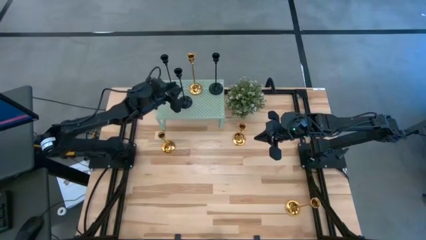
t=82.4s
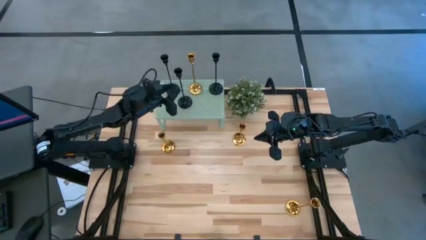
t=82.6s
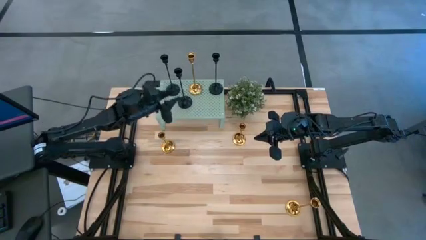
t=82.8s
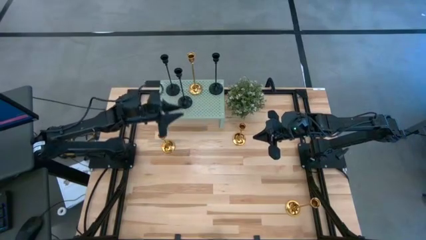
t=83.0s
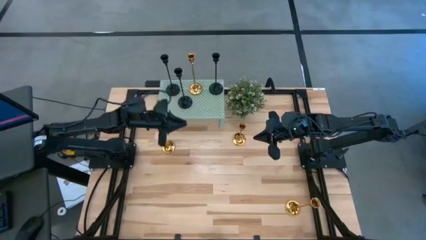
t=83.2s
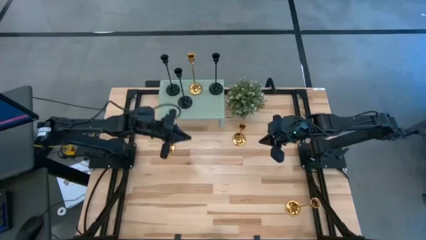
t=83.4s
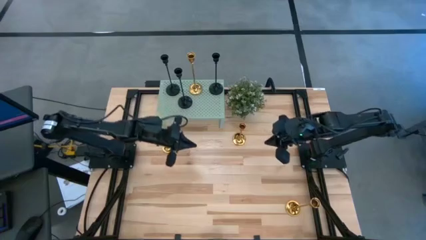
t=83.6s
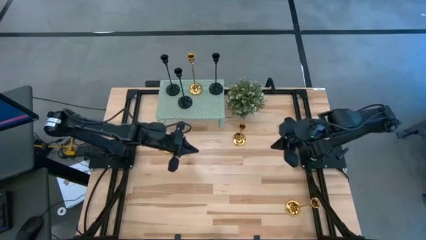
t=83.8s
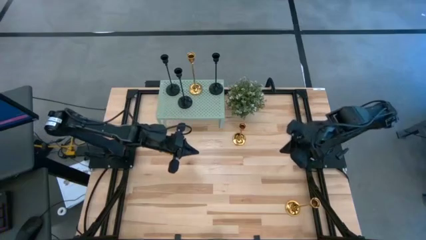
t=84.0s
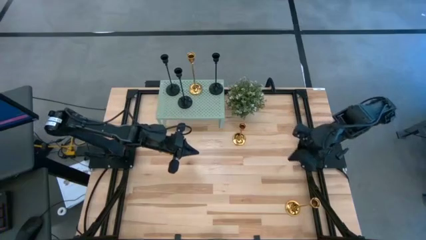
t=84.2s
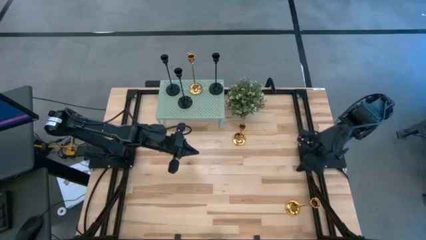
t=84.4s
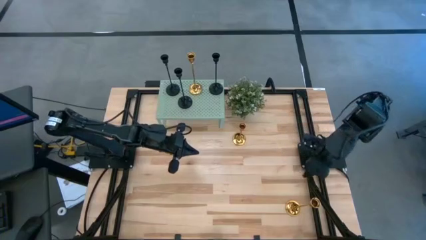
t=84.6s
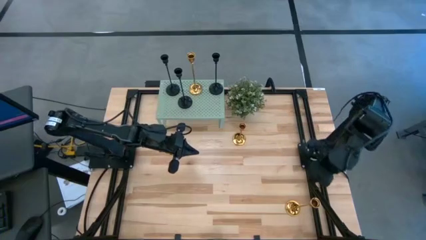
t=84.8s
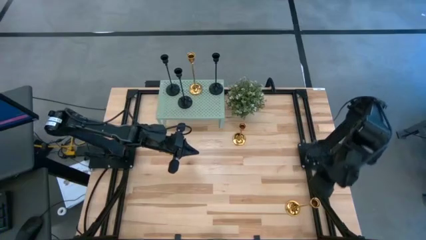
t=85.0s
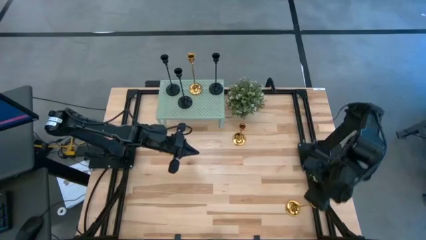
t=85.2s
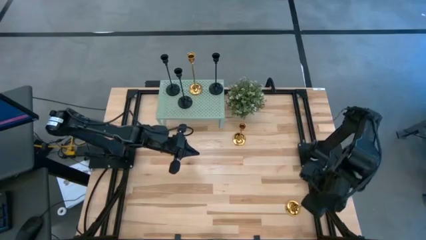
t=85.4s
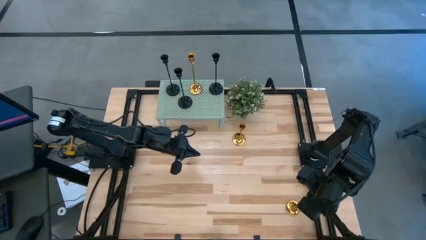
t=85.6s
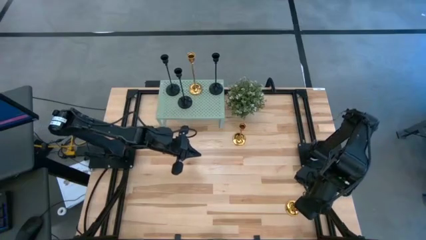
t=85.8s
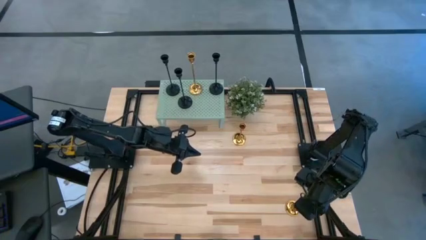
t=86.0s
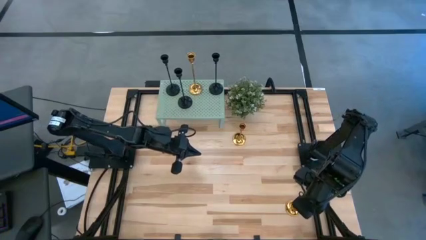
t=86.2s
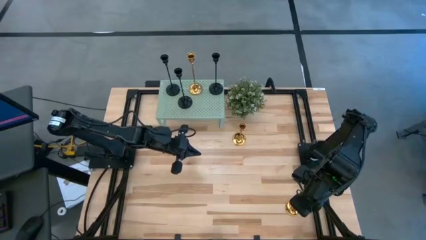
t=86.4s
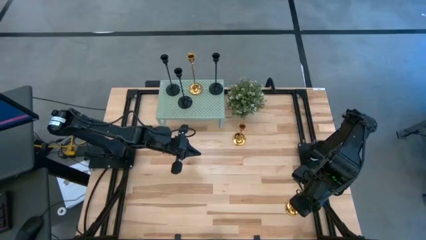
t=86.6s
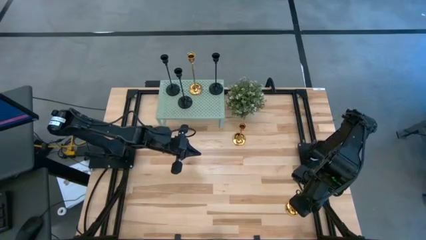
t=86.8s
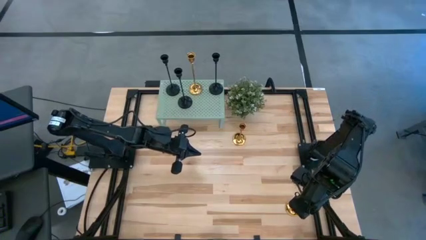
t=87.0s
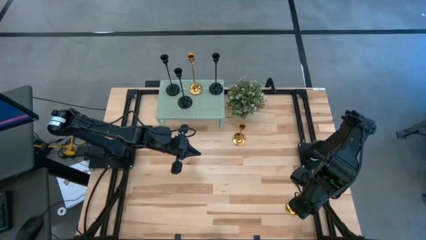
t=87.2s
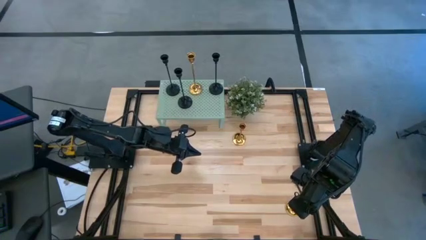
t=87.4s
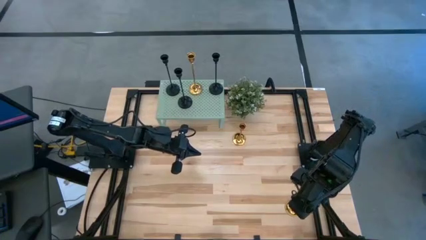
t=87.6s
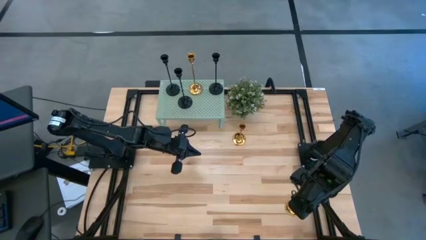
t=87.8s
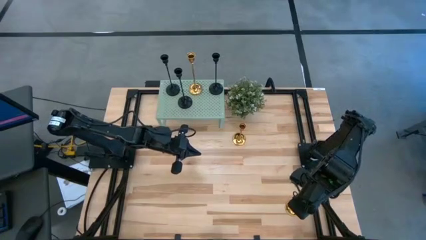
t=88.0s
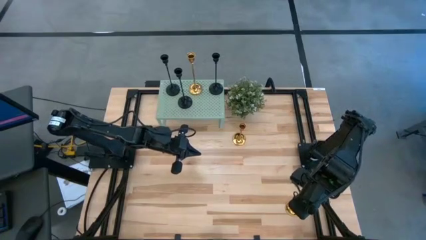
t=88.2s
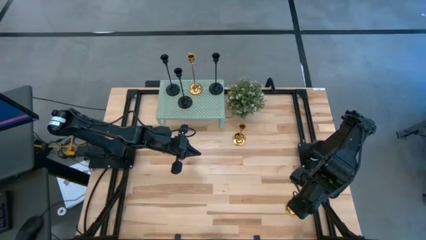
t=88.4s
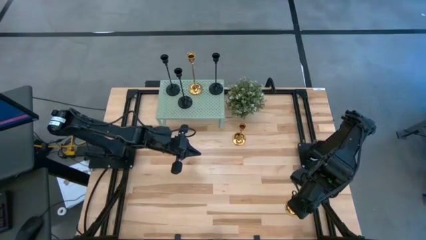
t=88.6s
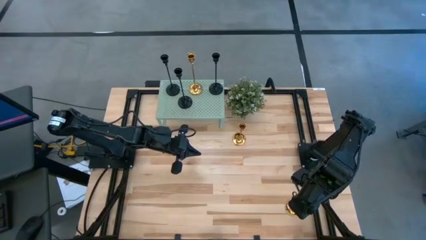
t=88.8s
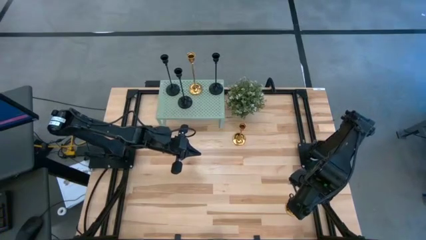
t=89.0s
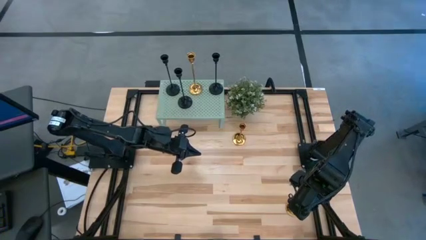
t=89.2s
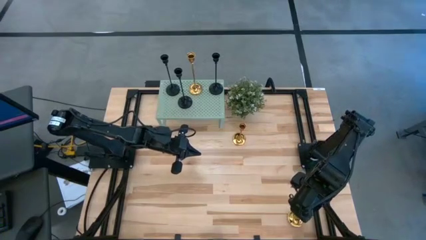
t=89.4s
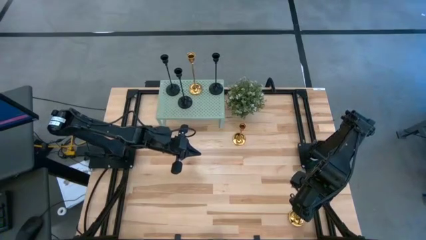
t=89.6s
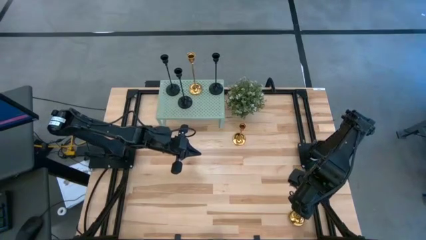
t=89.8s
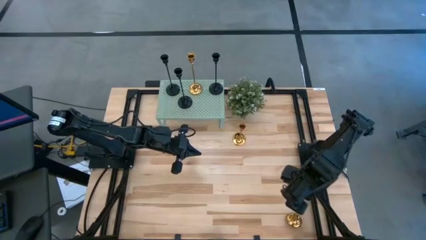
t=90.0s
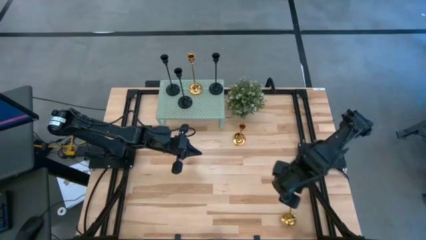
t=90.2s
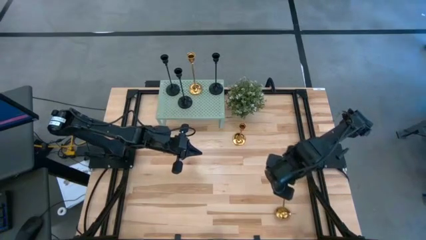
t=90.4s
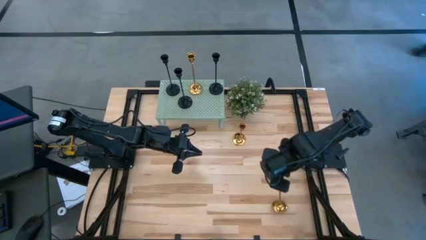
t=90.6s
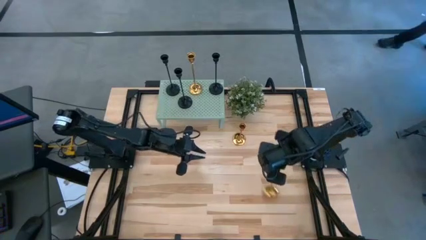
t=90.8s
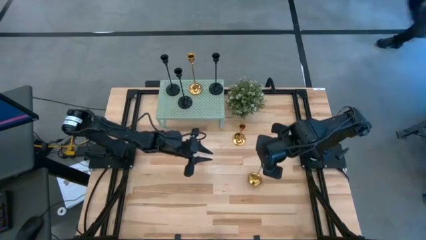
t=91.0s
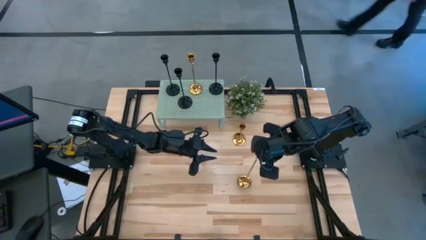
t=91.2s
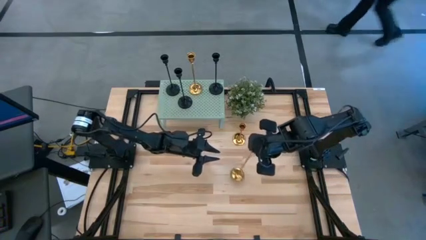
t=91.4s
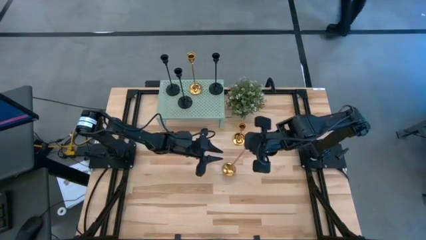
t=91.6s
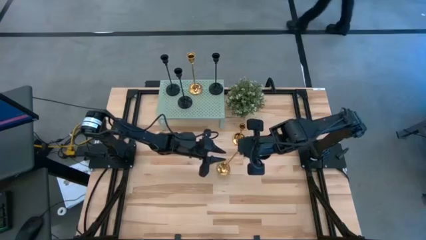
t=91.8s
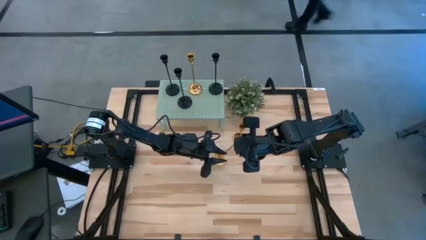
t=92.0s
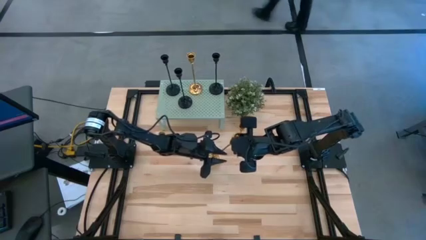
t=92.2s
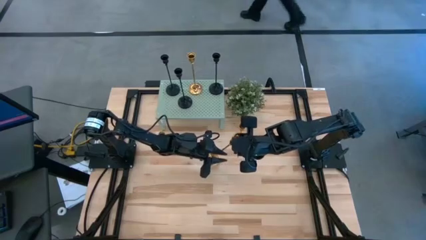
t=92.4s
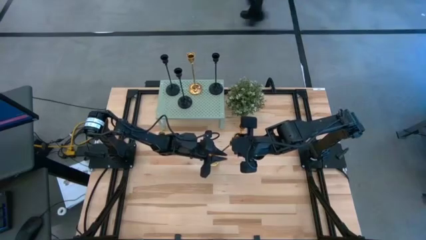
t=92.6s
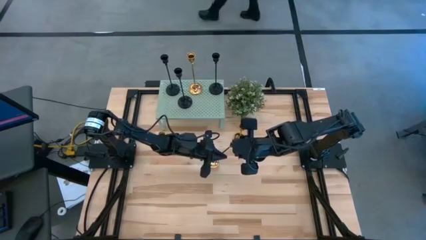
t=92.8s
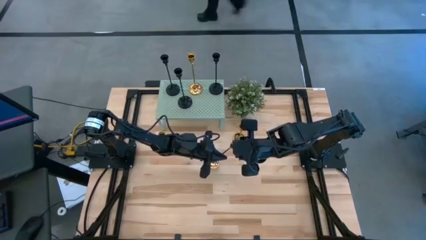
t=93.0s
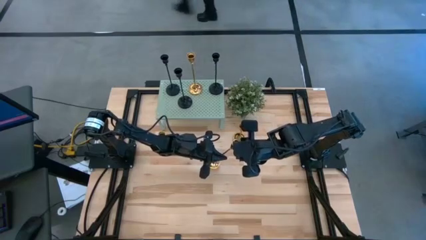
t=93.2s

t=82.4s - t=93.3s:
Task: Pick & Place candle stick holders
Put the gold candle holder on the shelf aligned with the black candle holder

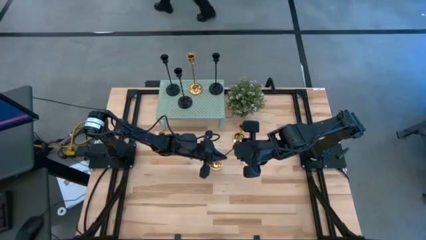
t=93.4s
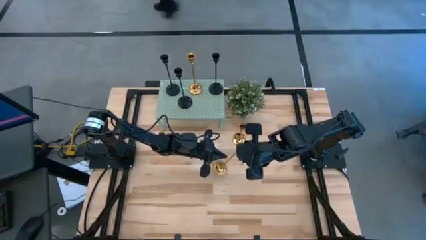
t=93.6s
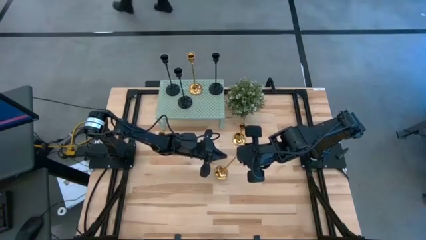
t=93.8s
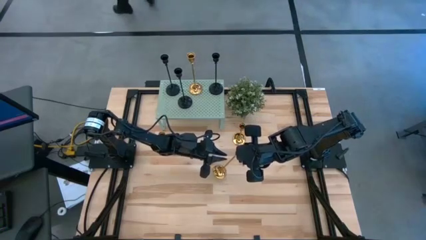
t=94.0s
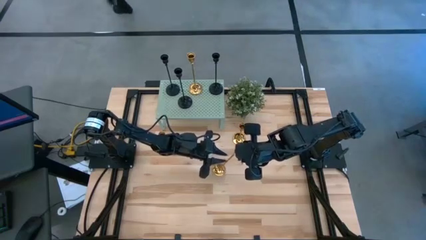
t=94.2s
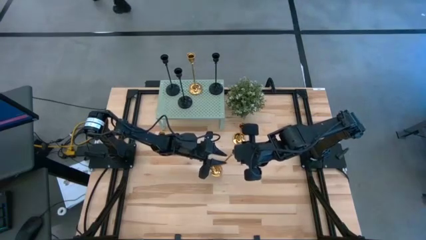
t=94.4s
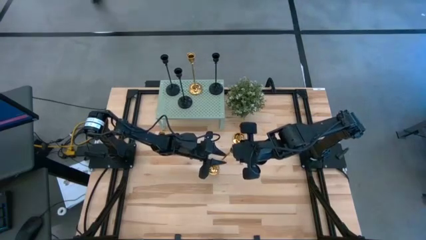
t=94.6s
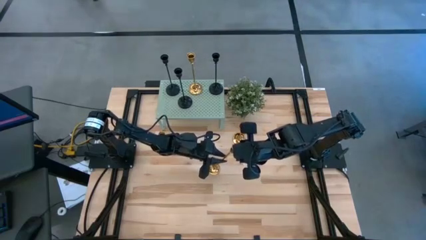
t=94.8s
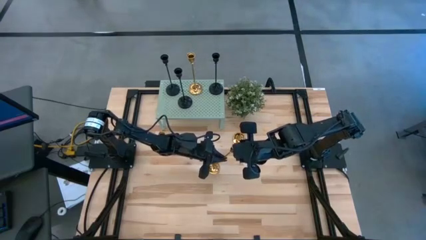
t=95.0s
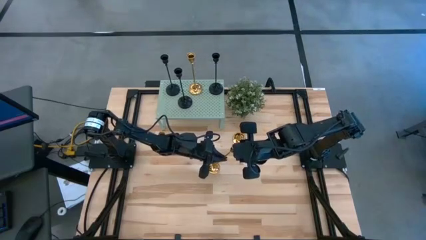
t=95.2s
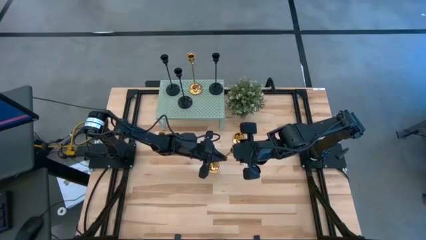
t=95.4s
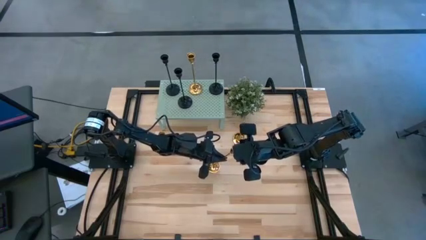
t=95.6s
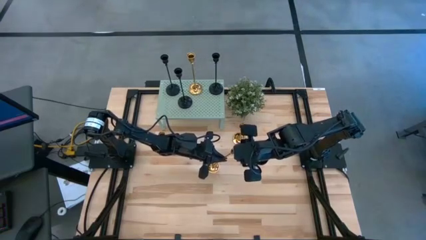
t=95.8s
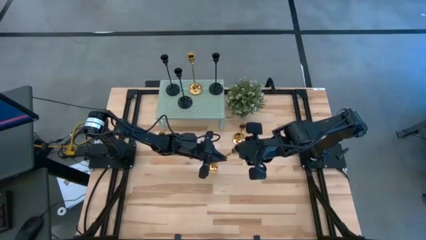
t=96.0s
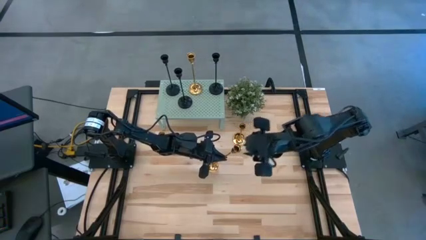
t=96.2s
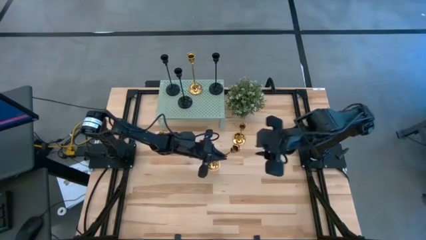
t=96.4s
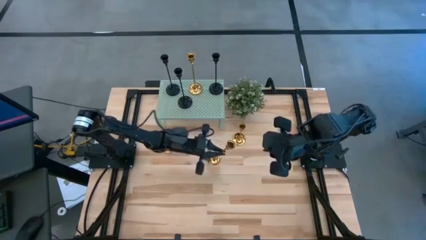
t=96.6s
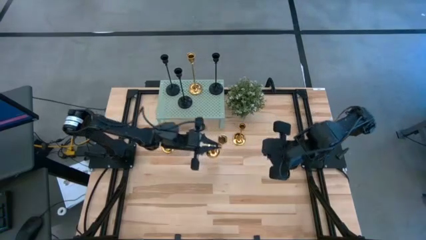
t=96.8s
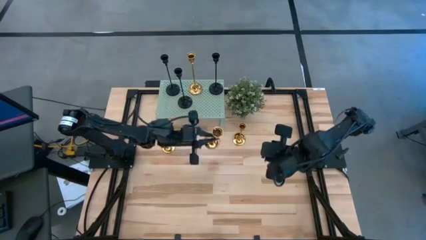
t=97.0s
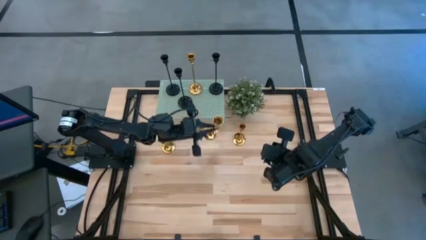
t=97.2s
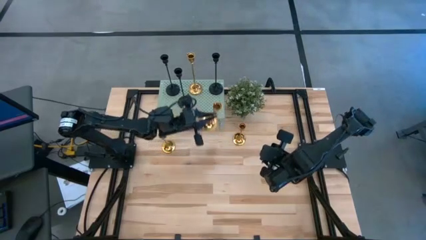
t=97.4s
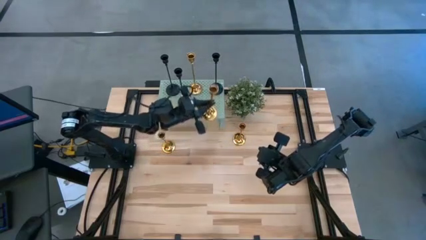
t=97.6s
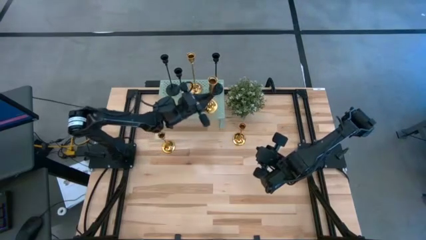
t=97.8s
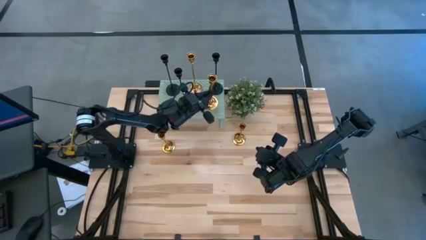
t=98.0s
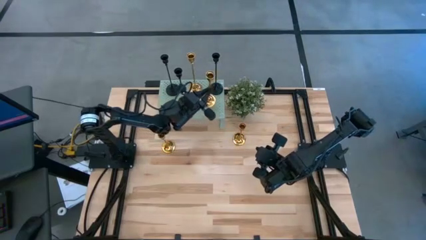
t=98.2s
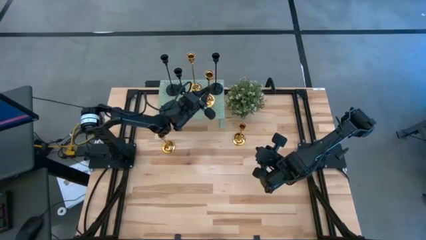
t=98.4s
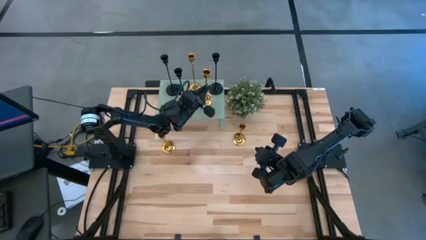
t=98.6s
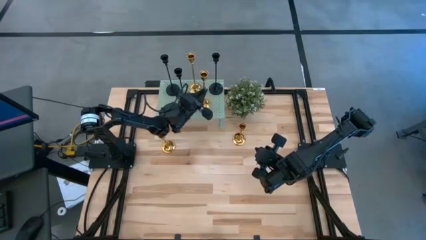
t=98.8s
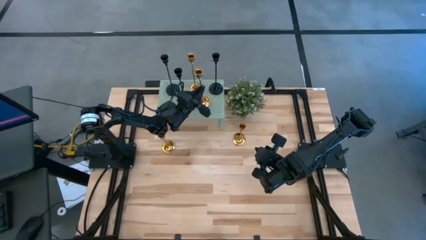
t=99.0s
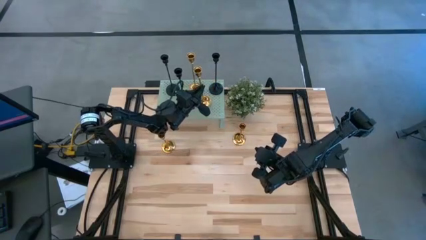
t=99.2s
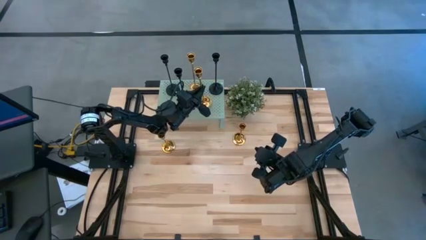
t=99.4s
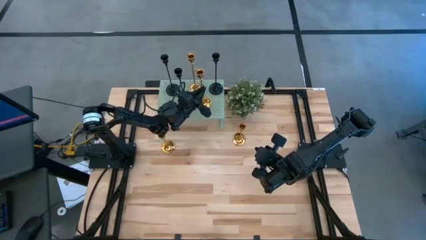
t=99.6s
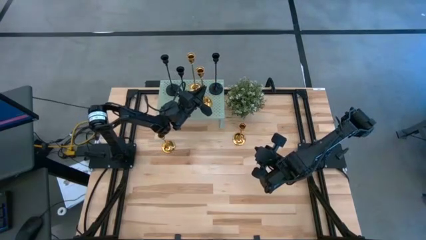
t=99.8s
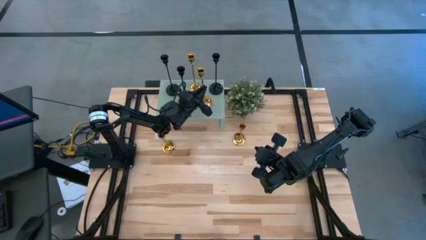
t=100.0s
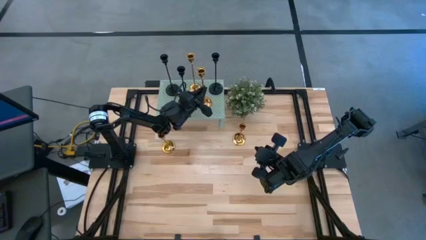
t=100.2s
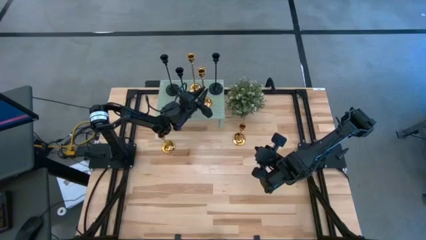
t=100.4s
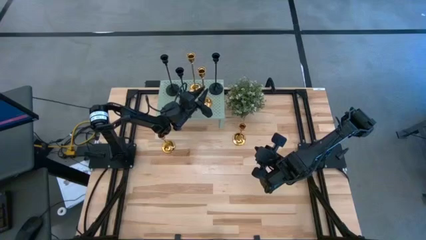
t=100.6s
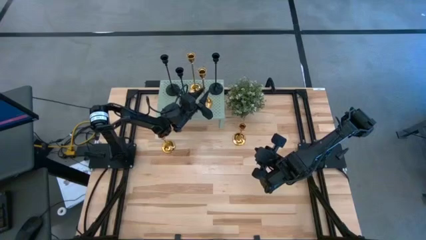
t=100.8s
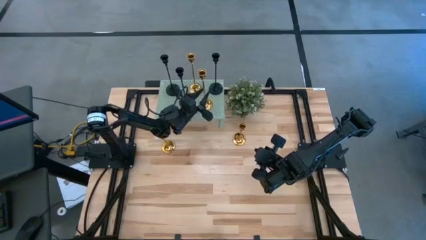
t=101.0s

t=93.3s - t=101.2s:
Put the gold candle holder on the shelf aligned with the black candle holder
